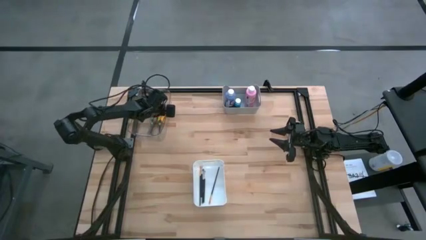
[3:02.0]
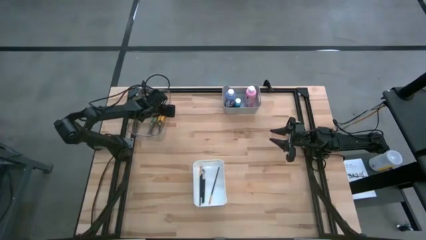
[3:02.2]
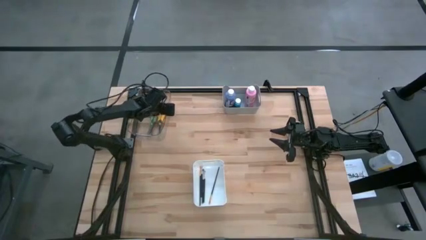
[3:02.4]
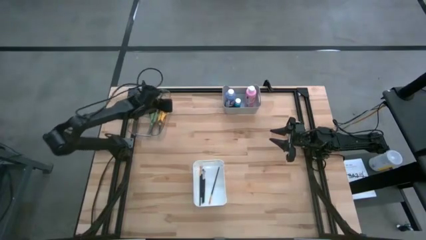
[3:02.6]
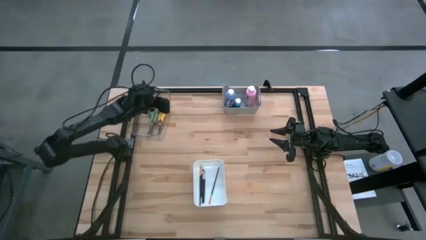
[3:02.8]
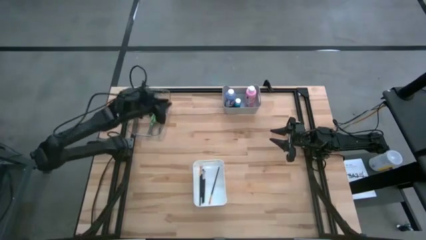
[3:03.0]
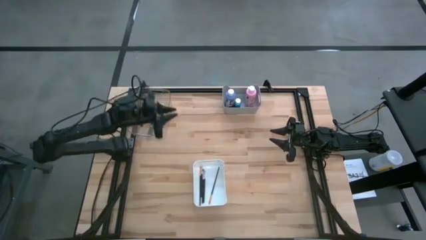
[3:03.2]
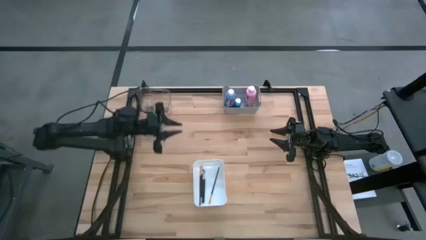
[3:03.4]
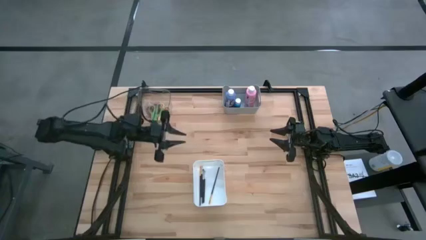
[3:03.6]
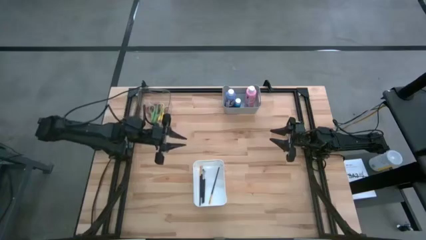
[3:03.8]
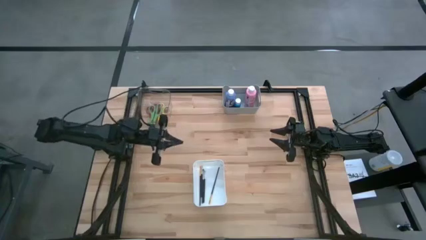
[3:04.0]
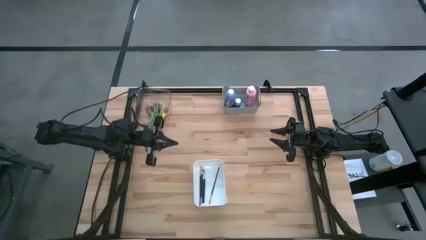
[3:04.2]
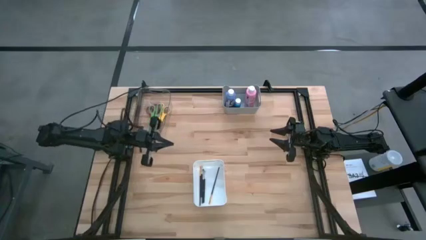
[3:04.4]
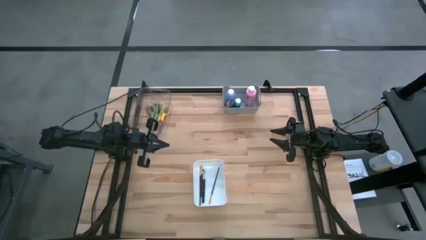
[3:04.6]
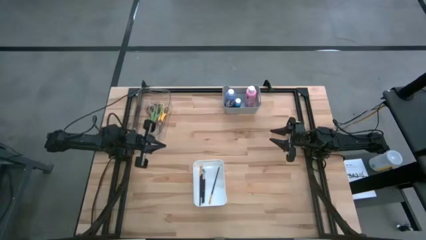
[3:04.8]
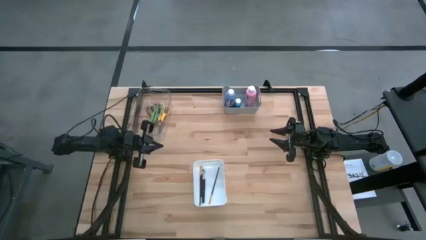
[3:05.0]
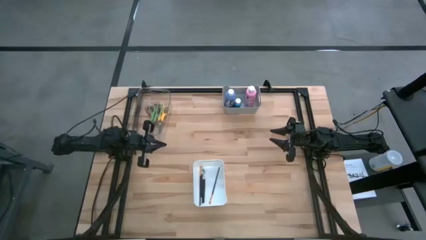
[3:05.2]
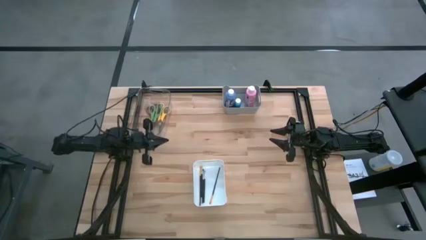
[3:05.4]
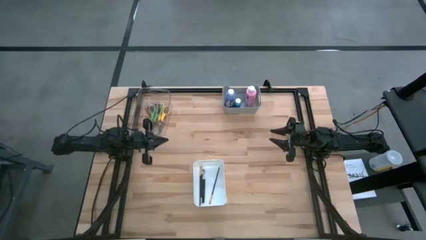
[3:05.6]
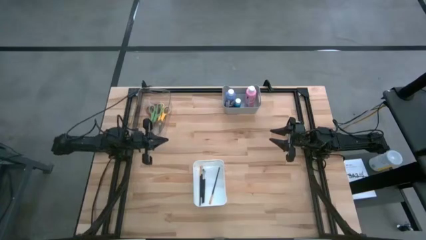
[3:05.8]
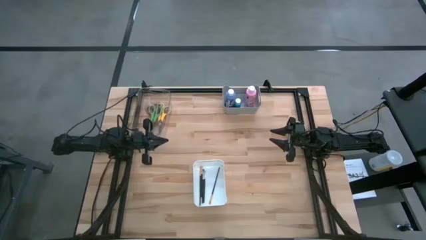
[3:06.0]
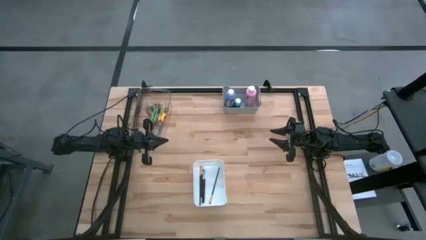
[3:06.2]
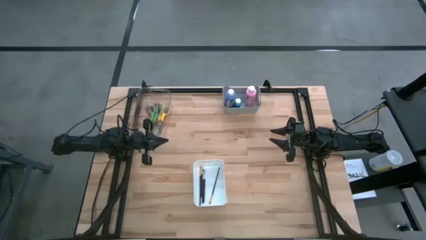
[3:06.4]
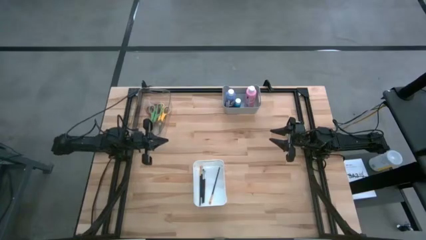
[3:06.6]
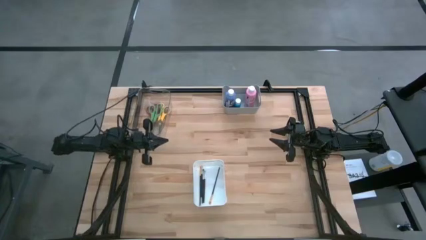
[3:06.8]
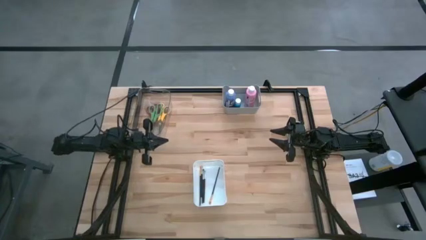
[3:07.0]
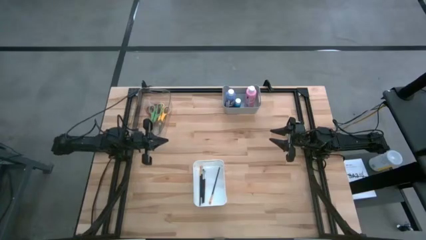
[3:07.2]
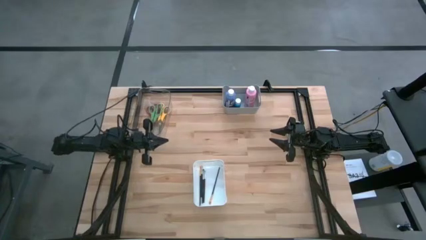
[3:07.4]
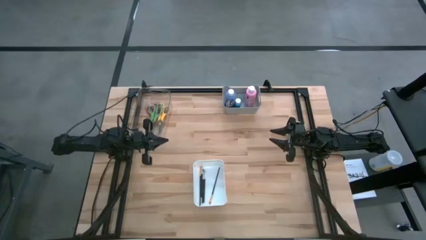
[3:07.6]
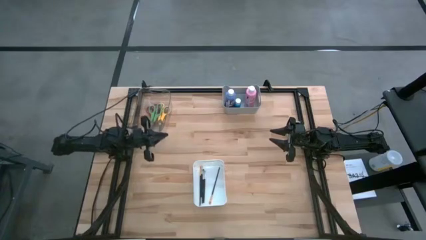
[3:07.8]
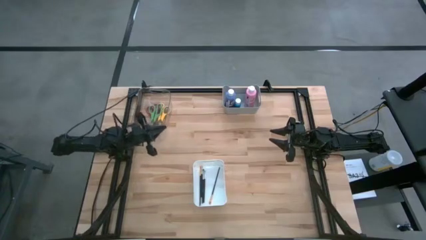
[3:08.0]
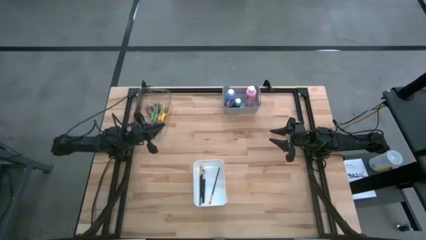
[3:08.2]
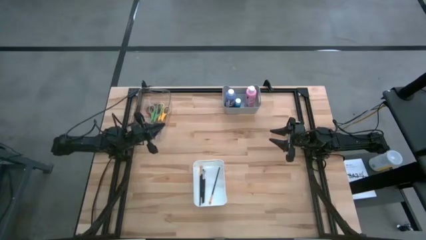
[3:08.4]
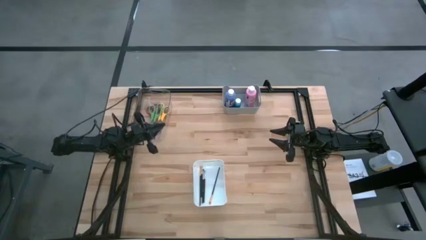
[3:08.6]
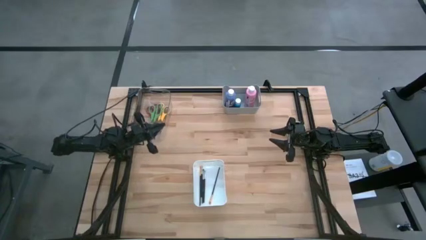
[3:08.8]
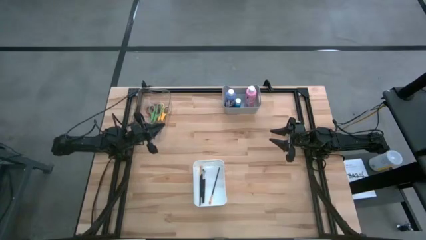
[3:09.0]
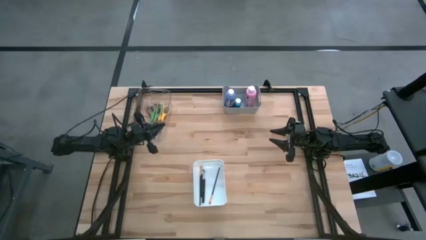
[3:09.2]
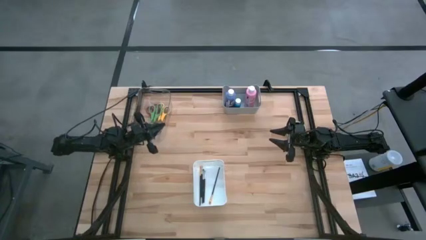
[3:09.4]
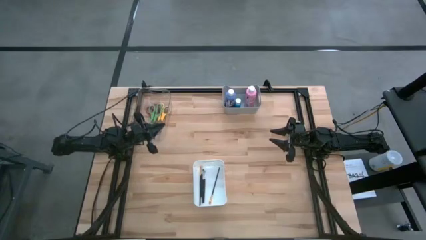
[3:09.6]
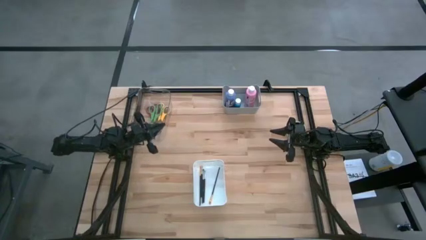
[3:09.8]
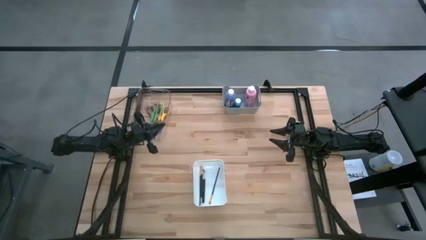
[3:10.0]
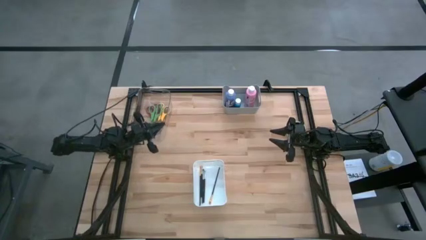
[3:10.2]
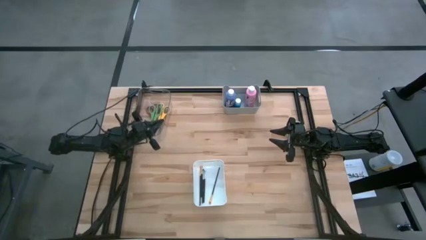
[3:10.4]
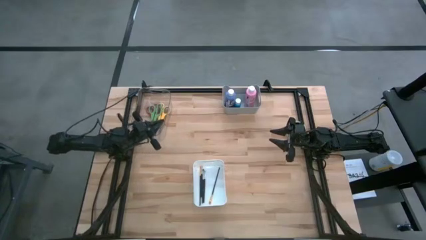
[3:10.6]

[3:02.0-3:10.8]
Task: Pick & Place Paint Supplies
Return to home position

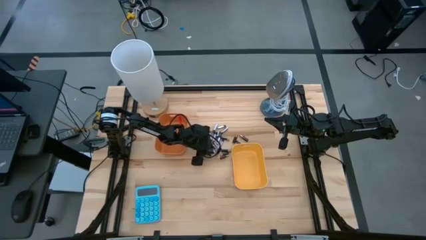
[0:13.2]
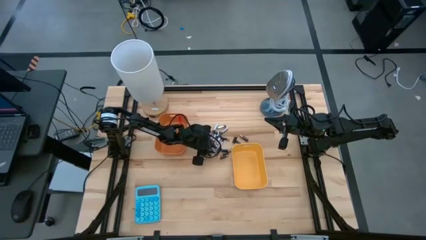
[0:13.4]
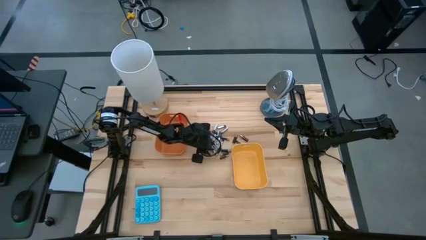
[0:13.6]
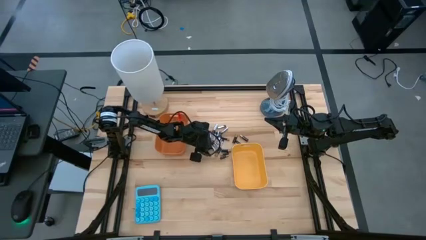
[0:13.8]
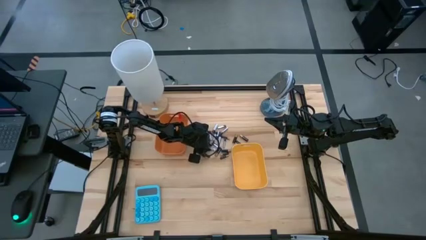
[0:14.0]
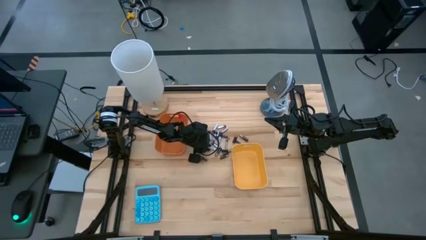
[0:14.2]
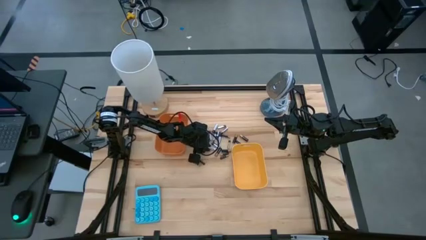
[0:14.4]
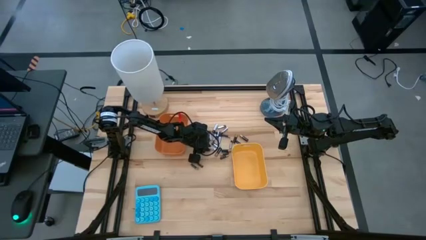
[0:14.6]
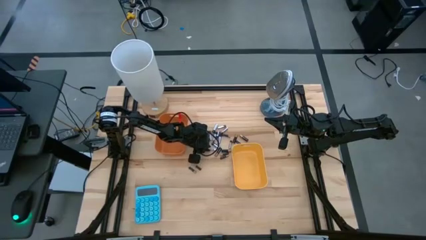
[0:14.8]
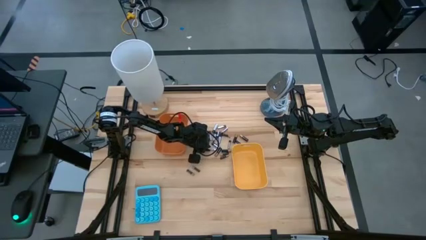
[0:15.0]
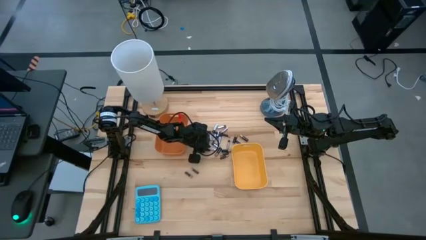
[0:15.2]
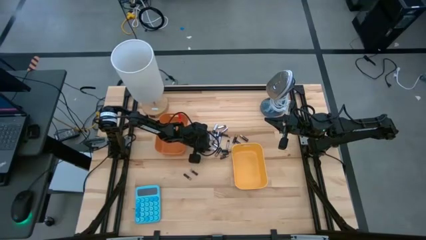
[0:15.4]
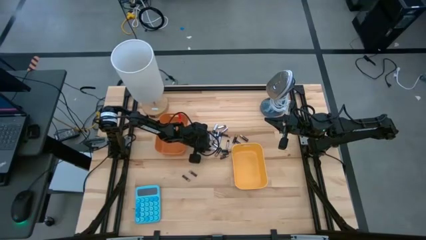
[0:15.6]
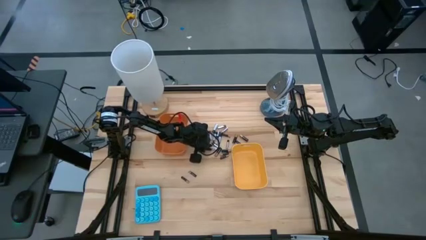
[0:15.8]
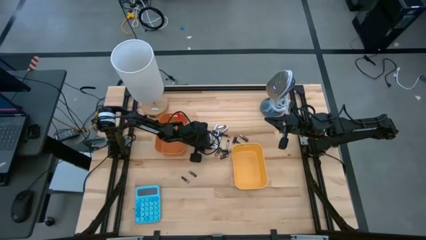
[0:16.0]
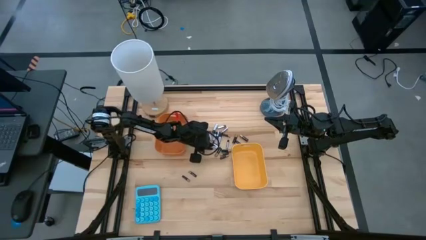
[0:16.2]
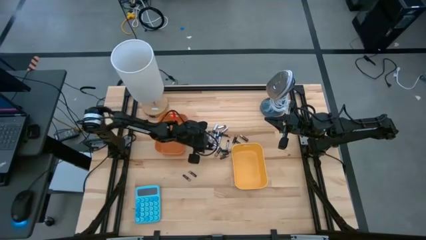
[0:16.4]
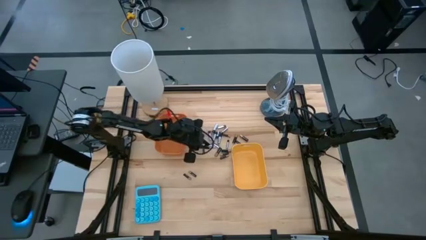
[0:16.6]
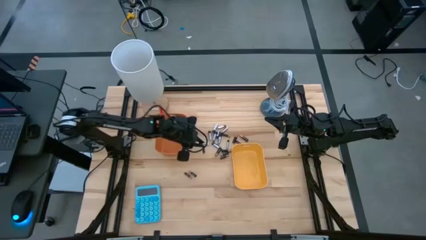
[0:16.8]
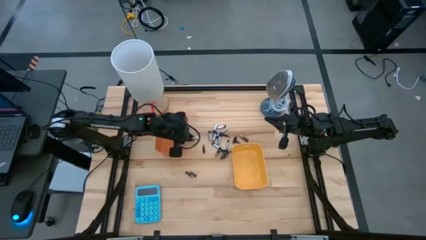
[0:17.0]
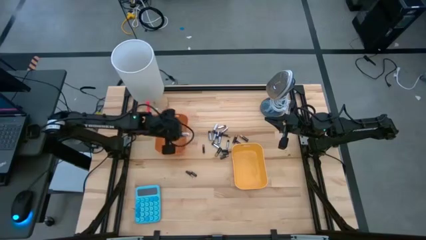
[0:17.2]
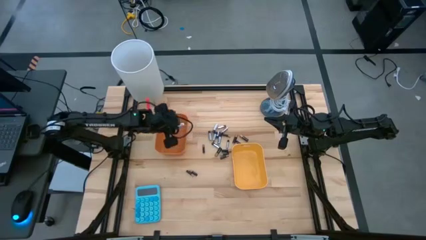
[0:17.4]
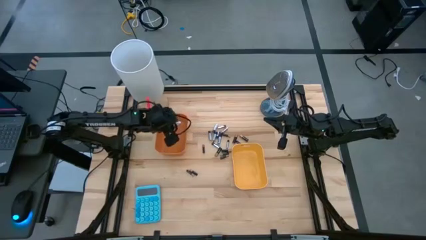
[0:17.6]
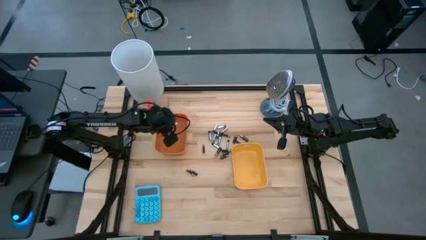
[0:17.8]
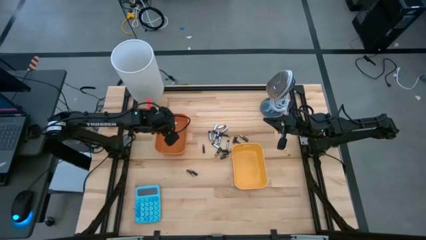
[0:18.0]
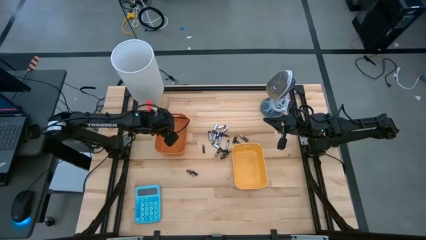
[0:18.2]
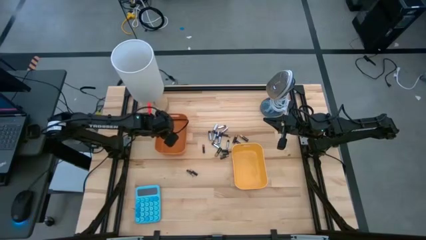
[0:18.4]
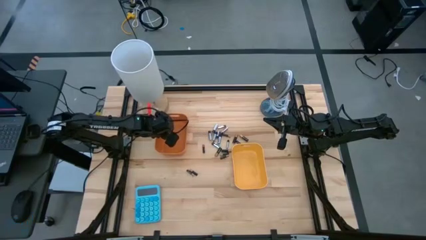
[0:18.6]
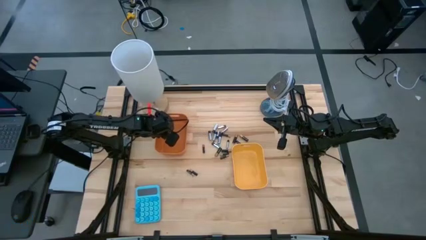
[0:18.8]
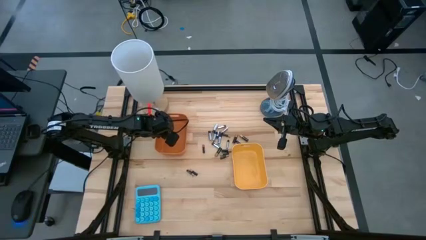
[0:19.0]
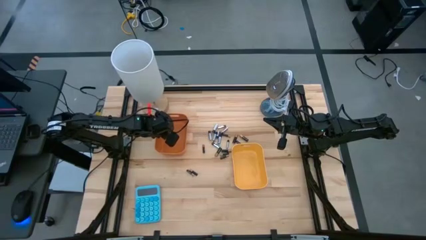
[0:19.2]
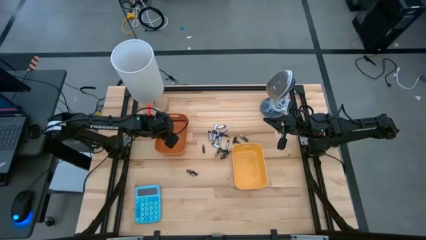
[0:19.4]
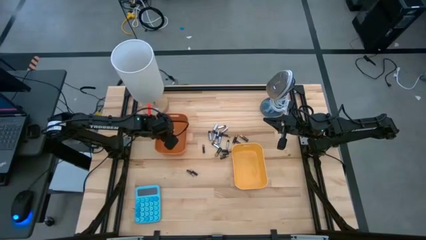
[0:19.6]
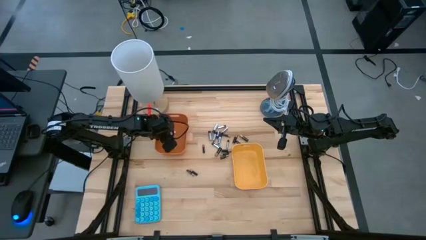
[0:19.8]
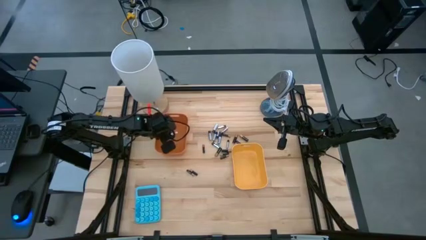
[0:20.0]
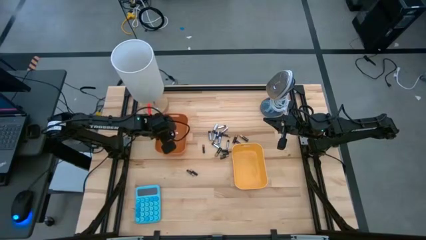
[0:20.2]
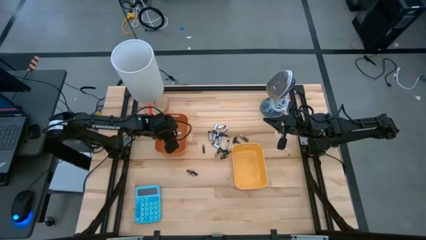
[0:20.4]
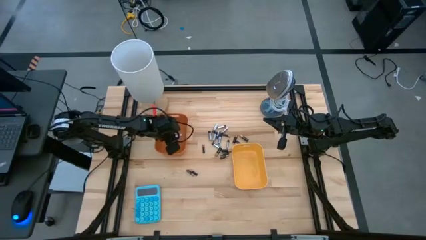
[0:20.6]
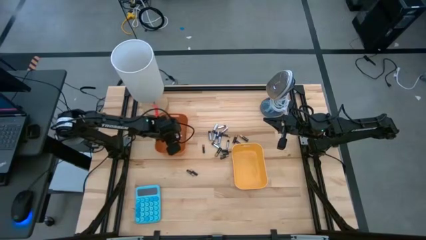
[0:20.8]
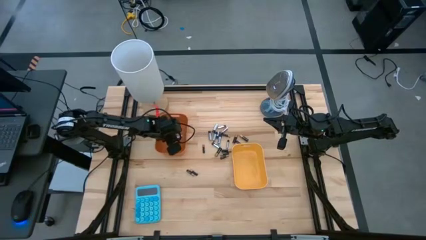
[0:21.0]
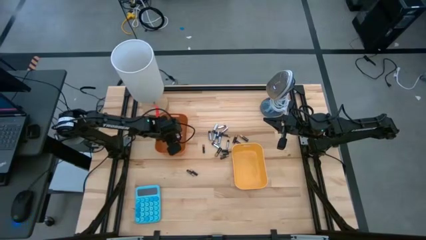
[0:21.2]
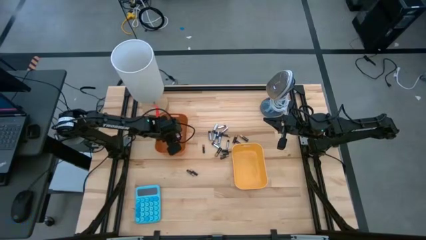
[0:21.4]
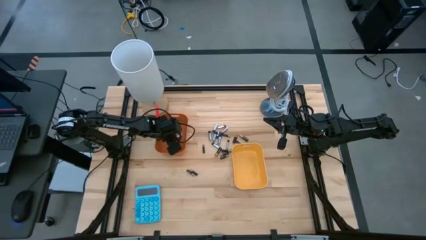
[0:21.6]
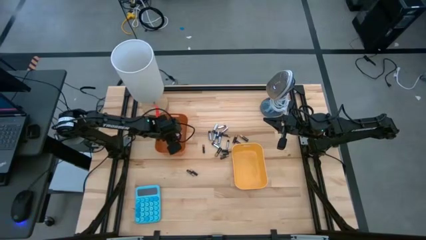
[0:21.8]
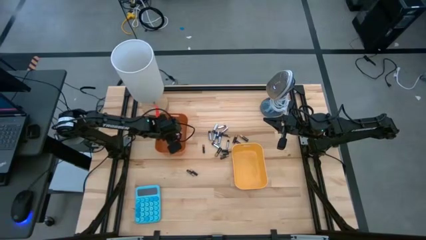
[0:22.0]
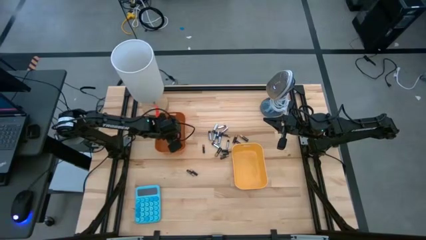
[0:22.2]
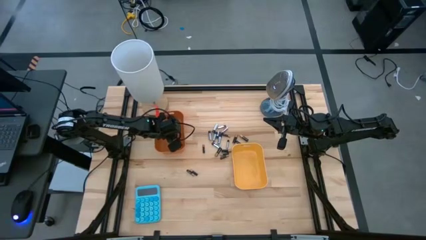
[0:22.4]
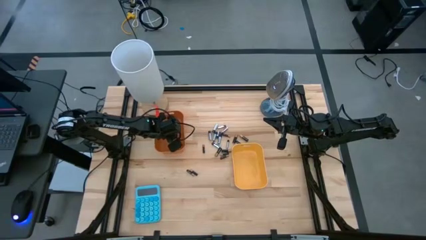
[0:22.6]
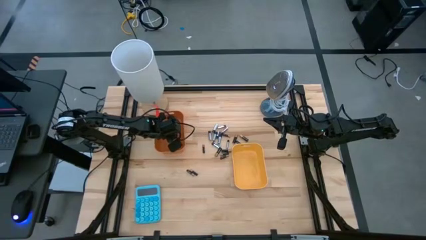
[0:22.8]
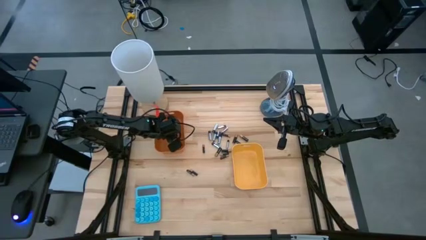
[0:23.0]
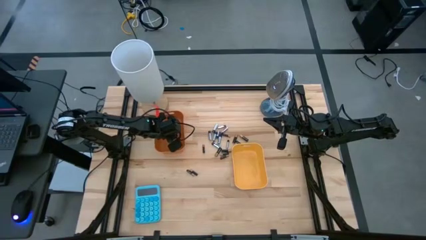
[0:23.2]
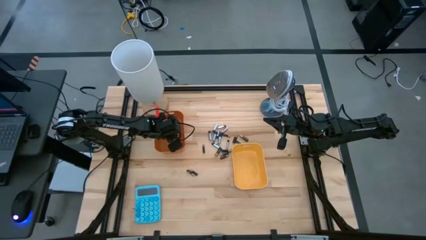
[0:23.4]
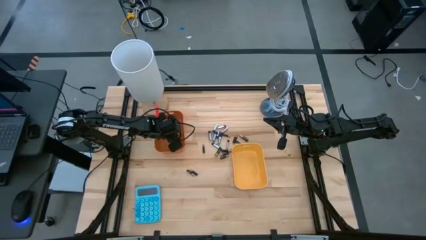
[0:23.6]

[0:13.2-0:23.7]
Task: Sort batteries
Put the silver battery into the orange bin
